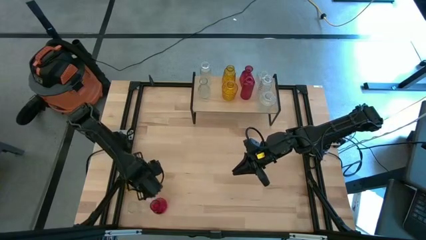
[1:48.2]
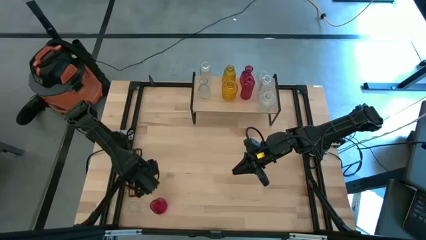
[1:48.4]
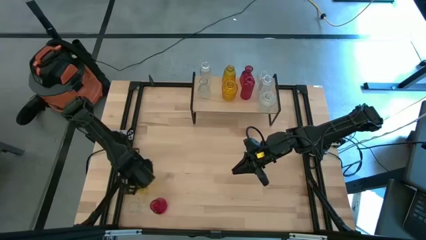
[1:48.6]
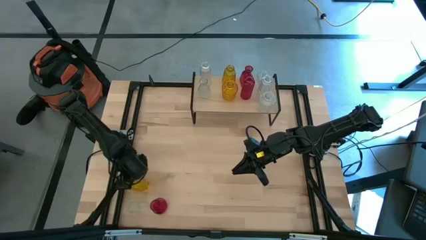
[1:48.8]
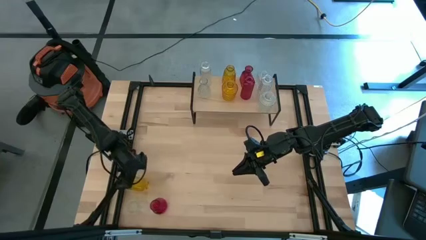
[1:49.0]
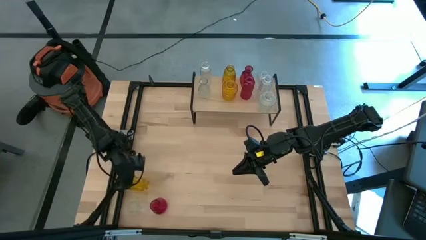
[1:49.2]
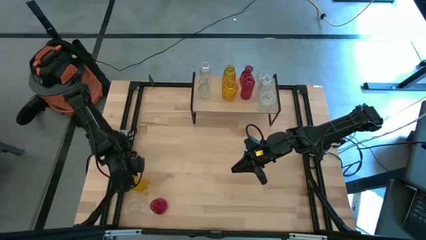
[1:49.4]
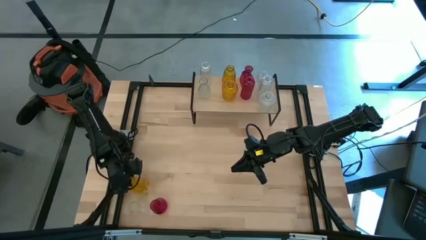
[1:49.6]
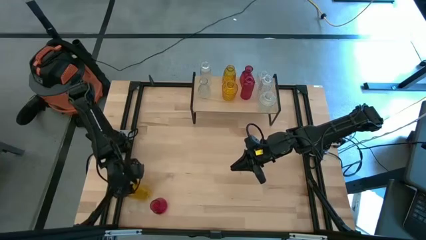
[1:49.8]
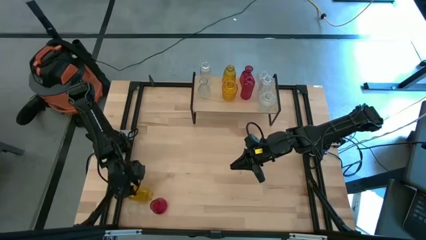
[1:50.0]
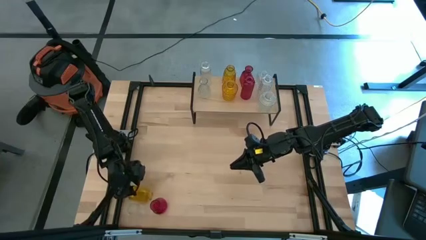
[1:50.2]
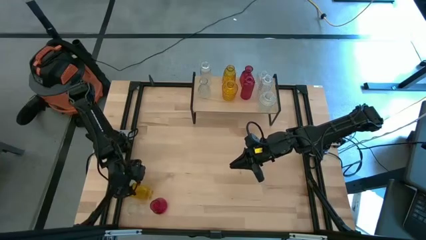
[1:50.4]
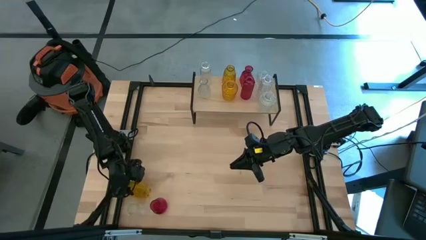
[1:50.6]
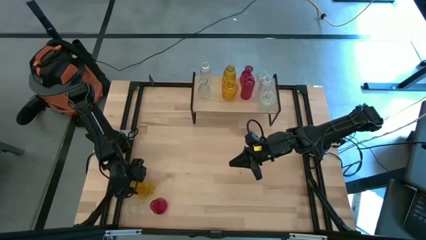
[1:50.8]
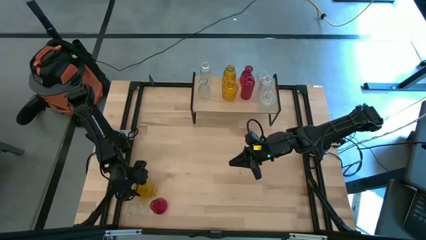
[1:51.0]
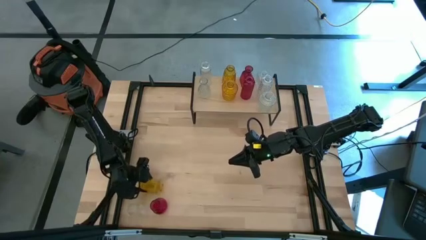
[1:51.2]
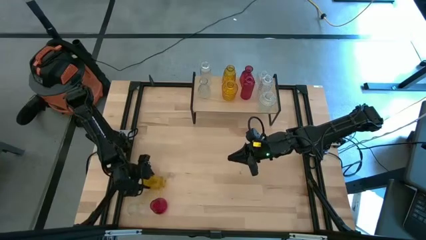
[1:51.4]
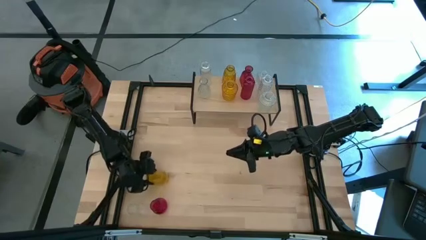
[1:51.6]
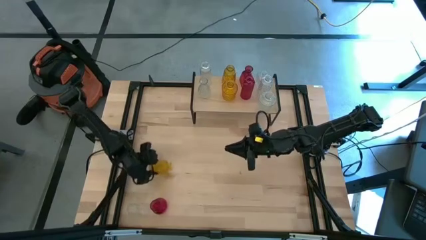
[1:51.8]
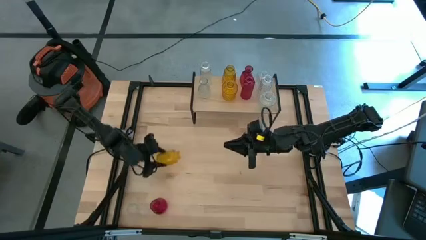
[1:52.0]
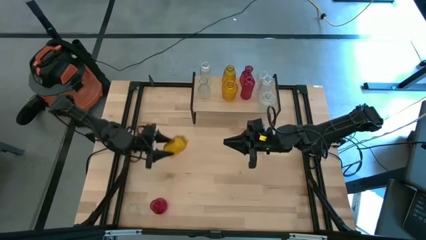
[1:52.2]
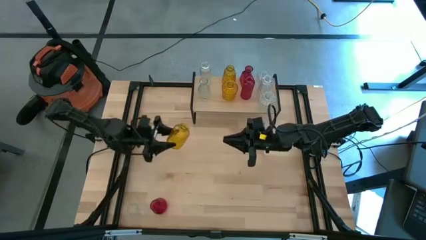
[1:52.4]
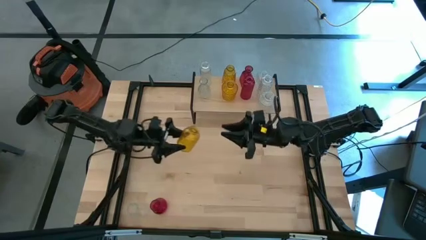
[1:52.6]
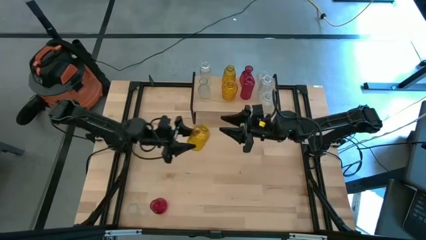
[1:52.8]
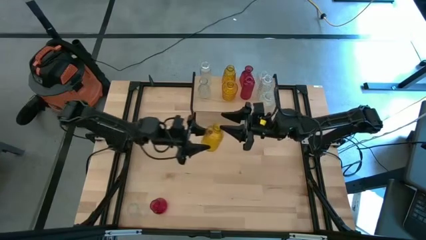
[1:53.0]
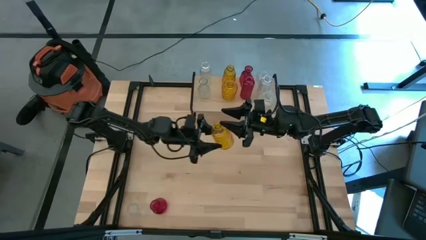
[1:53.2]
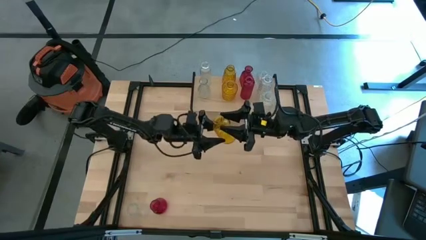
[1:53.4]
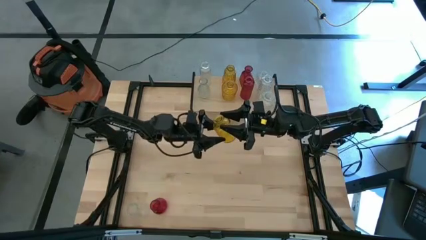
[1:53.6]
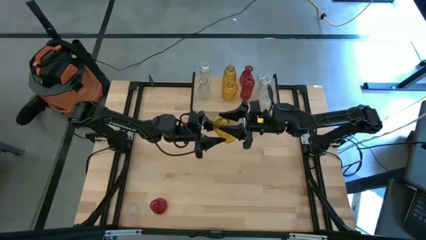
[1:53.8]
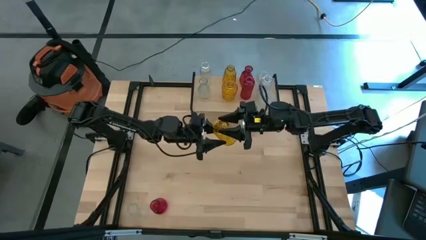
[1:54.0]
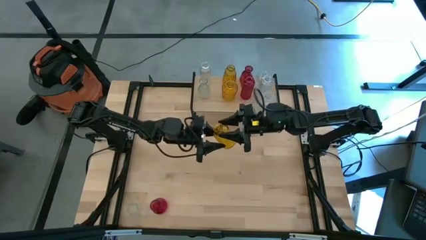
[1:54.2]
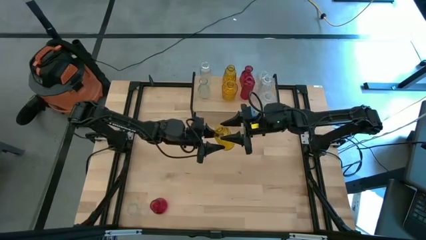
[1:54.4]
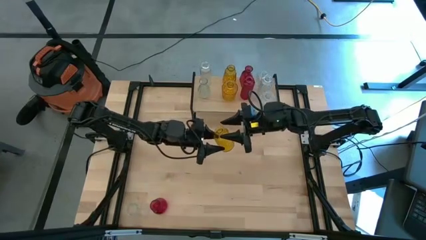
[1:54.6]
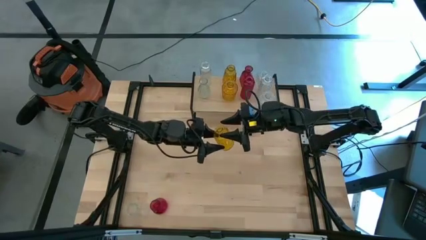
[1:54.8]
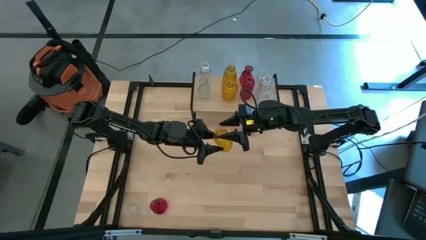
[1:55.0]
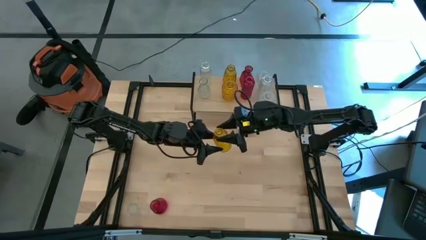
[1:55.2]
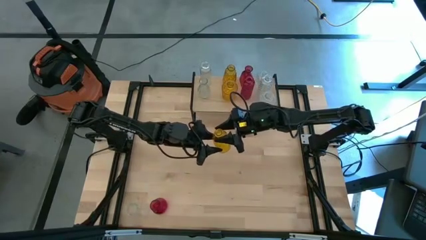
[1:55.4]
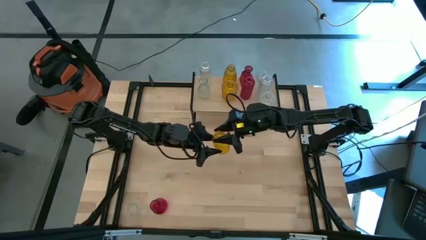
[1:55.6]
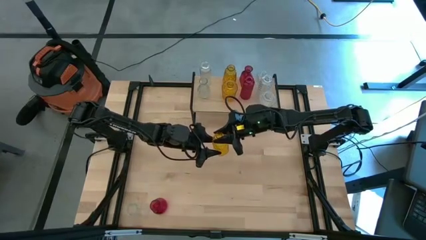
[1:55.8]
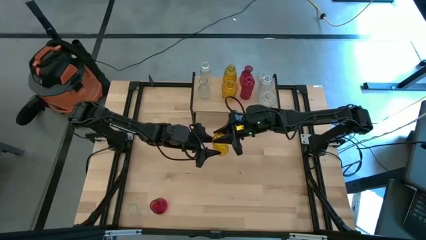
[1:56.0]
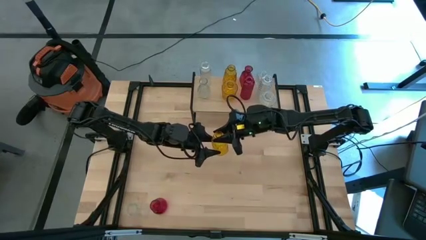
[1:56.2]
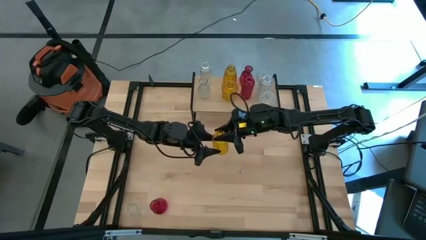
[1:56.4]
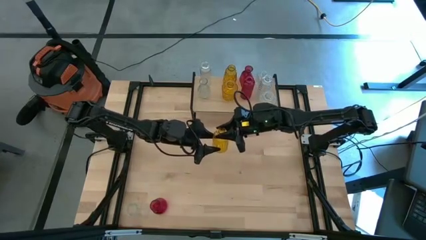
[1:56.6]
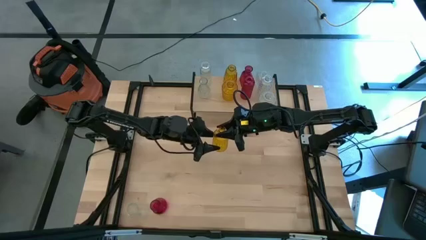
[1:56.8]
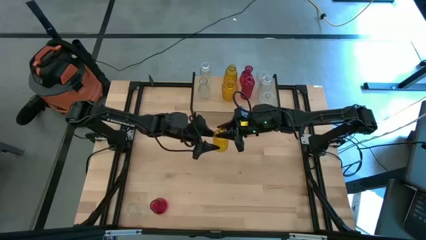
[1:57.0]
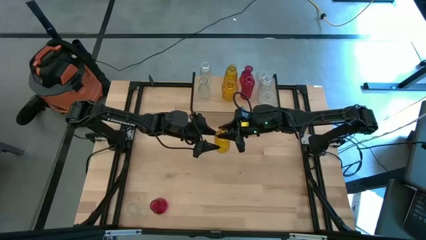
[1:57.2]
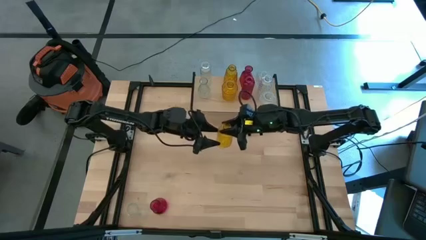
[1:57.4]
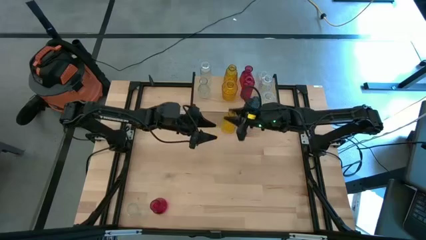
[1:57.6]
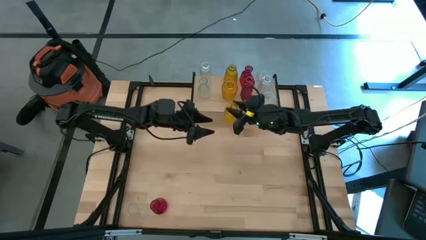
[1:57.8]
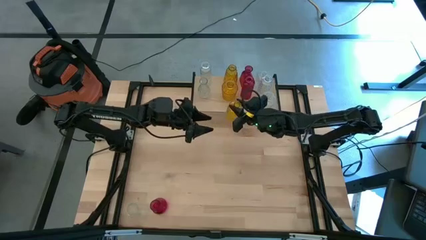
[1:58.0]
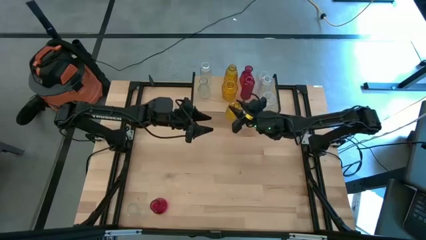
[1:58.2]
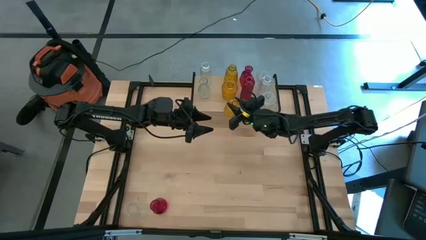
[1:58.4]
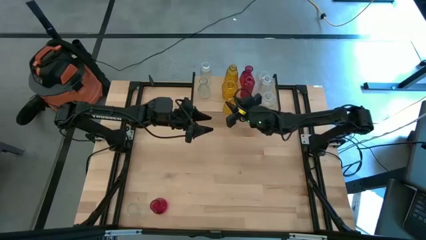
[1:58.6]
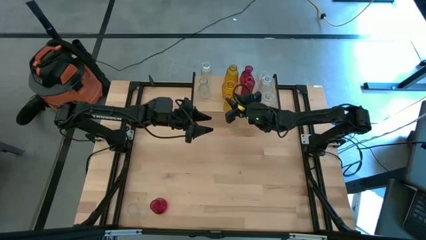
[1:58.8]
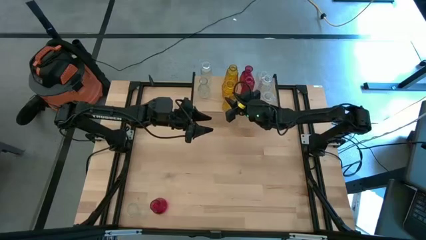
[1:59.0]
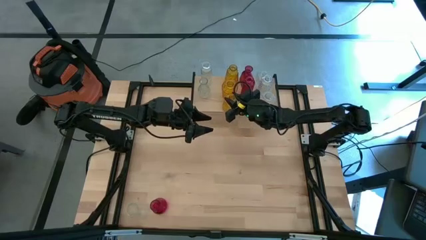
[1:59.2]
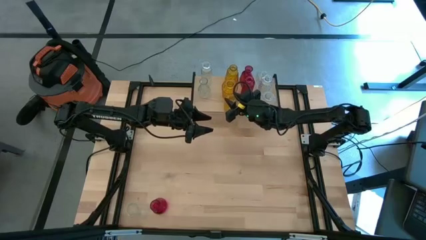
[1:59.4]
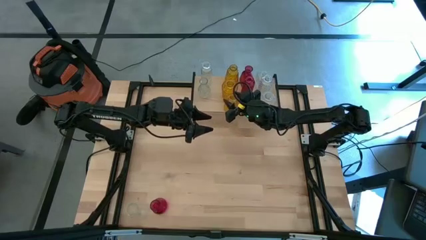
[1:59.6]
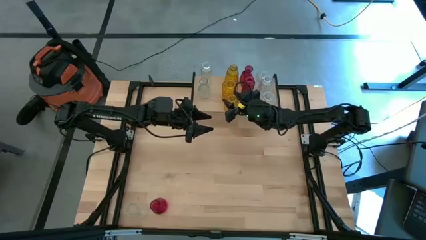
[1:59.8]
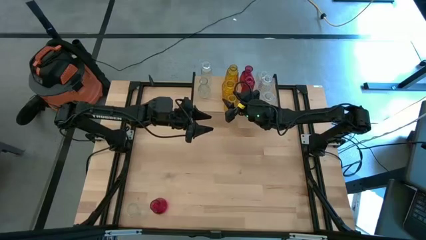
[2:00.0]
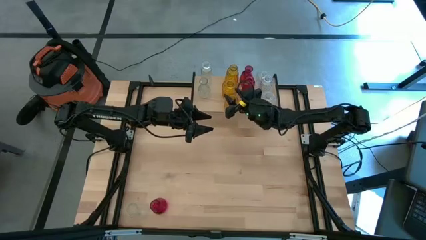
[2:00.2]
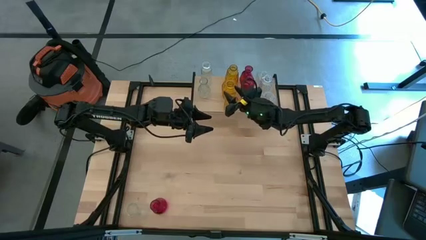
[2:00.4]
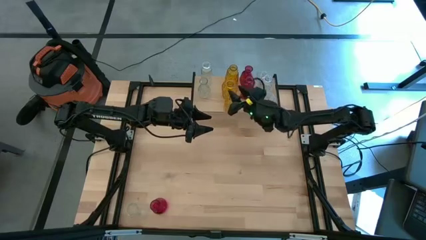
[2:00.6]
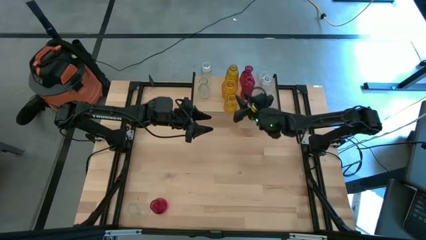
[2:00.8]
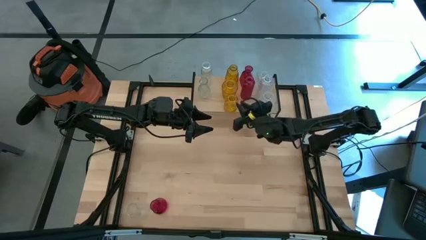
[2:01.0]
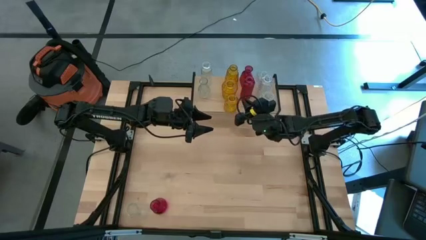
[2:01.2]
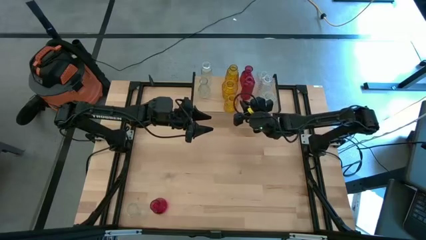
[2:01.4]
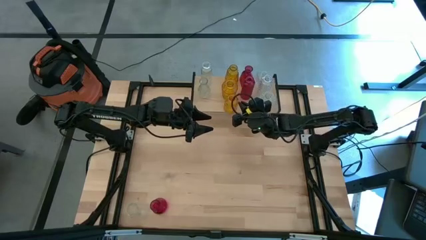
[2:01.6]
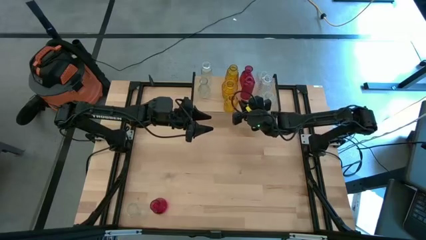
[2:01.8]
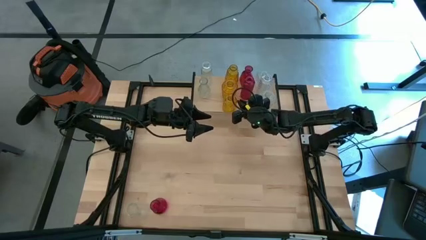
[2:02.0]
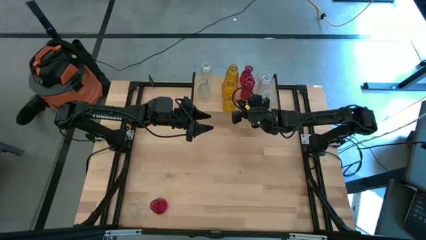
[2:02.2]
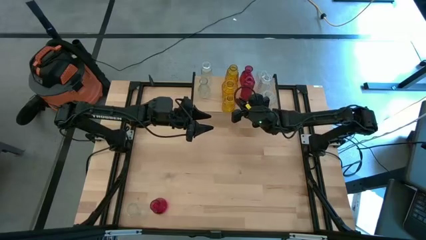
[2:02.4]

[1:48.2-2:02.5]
Task: sort vases onto shelf
Put the yellow vase on the shelf aligned with the other yellow vase
